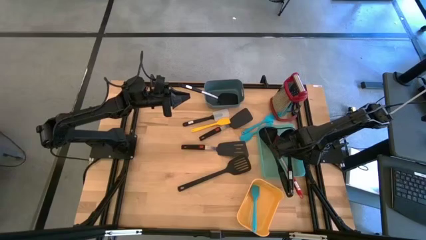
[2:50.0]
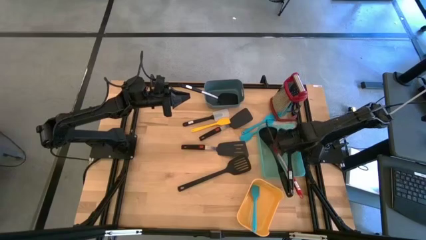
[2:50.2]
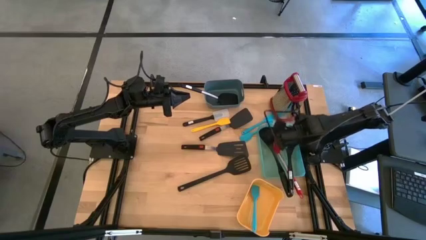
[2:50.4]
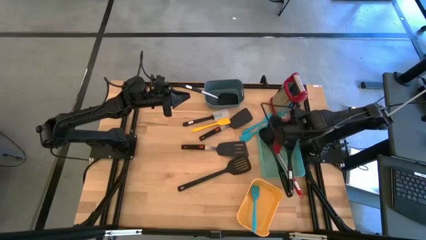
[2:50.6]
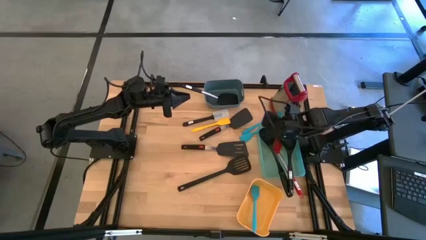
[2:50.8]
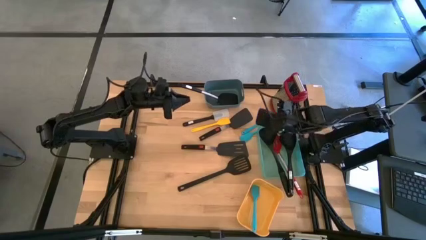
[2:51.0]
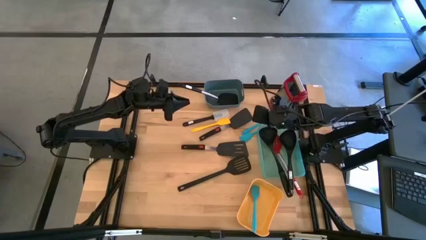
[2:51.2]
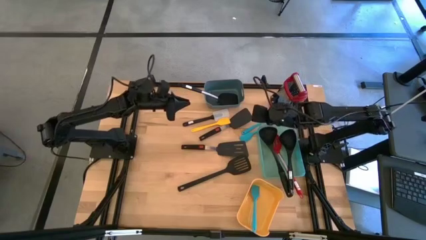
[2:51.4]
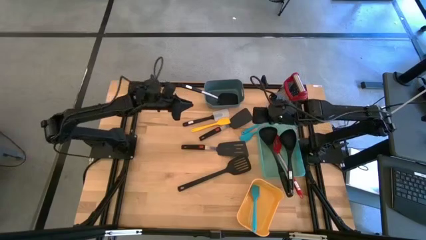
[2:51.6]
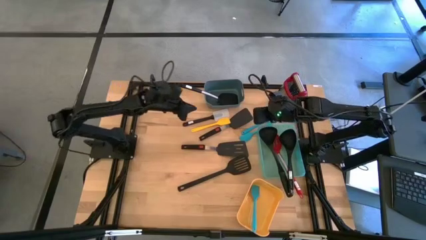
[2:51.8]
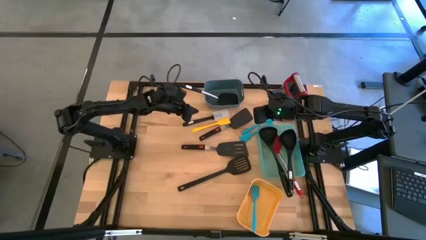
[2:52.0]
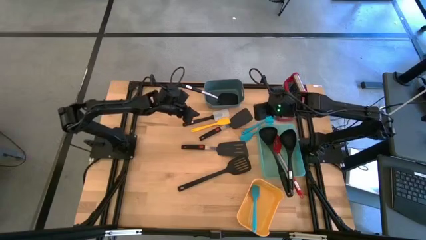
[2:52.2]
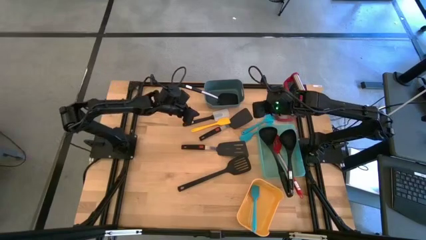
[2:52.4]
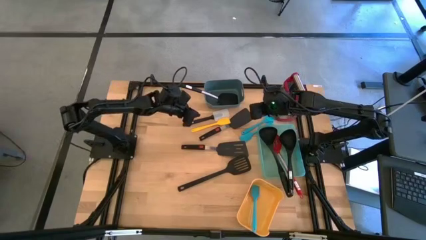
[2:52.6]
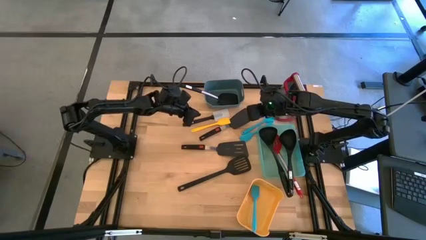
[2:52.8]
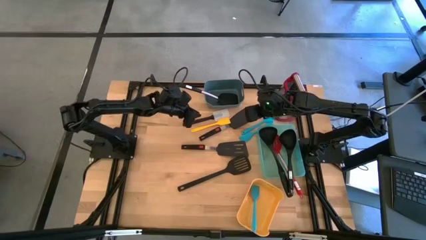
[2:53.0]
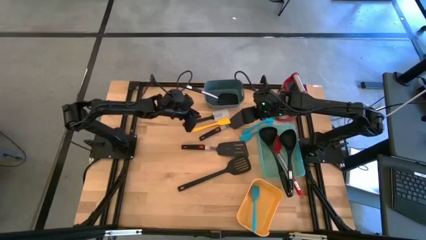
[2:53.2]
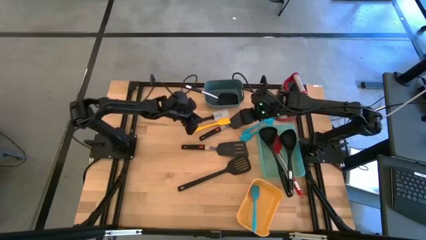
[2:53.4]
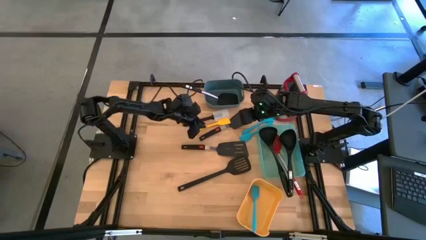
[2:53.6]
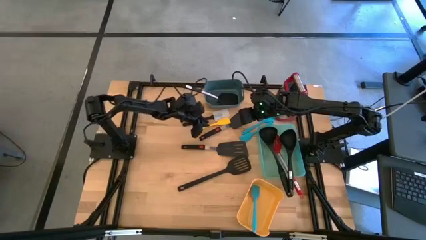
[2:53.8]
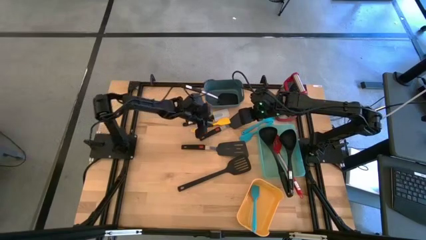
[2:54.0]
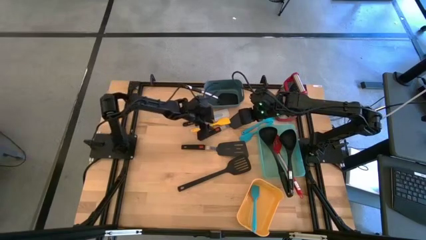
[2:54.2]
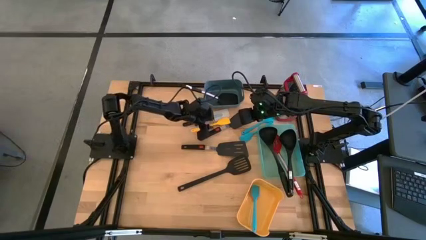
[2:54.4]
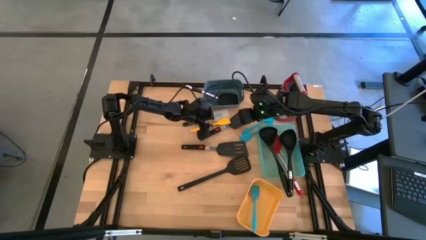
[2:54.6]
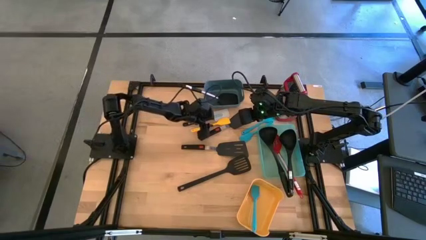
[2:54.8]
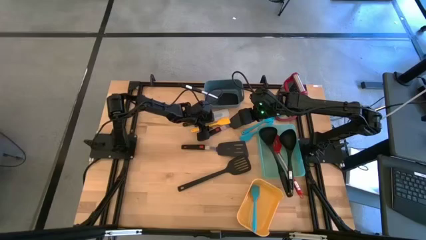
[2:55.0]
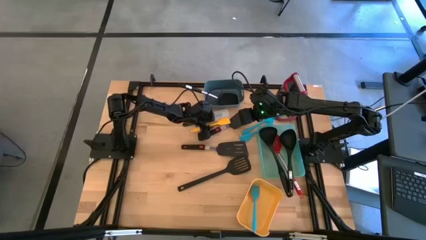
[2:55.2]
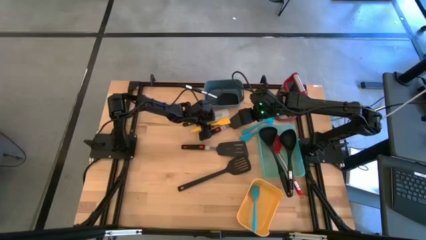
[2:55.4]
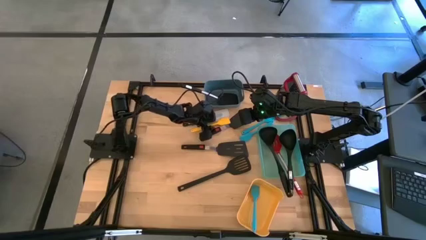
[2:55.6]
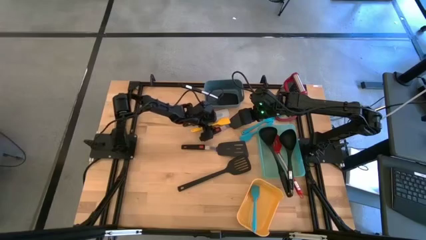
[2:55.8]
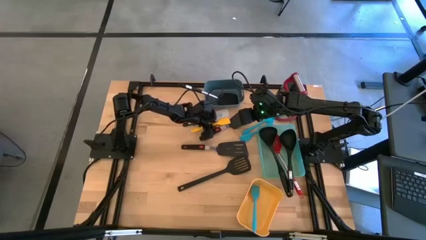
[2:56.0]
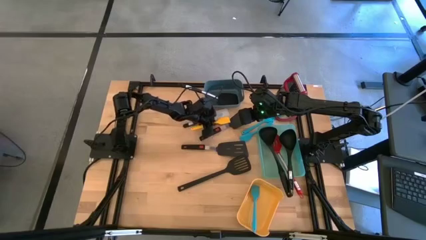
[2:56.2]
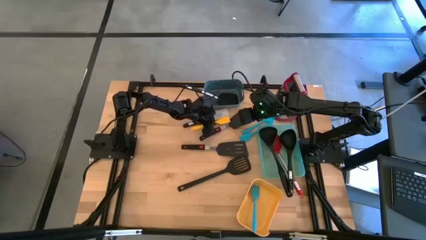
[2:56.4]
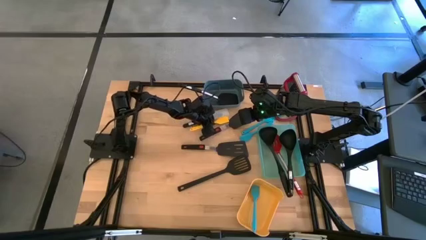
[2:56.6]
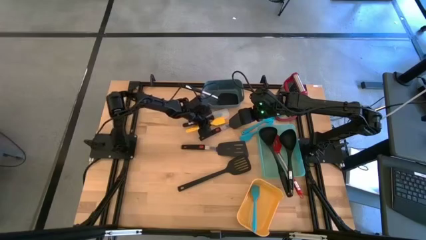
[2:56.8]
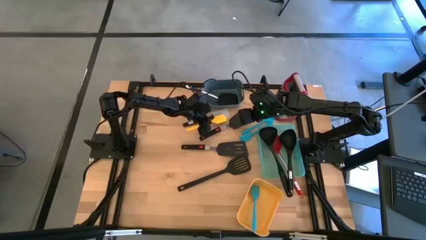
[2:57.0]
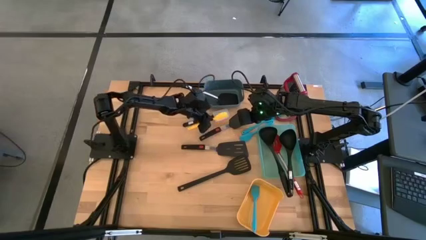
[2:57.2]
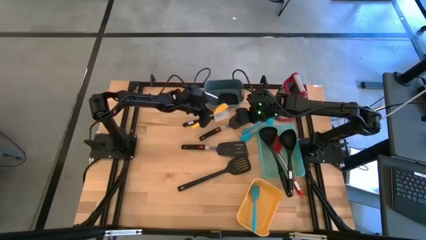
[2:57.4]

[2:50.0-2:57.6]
Task: Pick & Place Kitchen Items
Put the small yellow spatula into the yellow bin

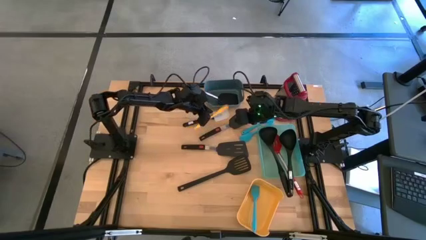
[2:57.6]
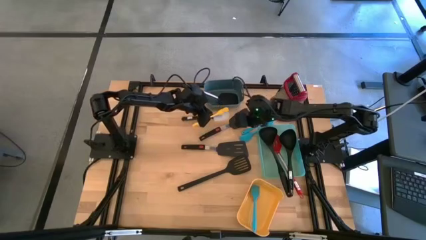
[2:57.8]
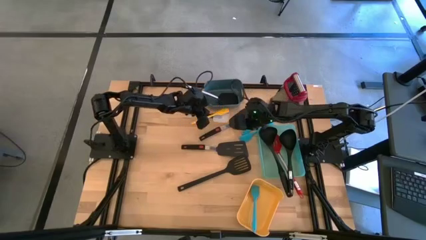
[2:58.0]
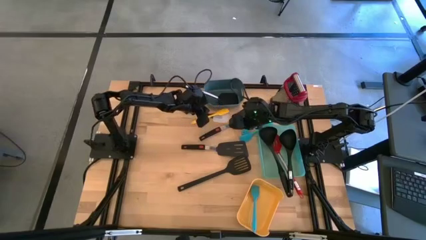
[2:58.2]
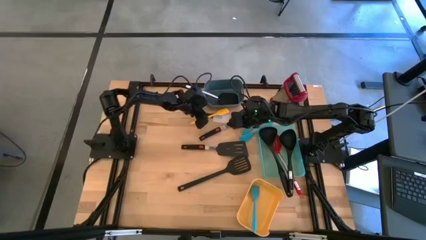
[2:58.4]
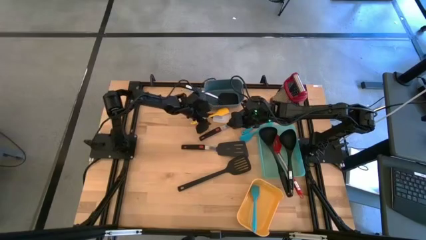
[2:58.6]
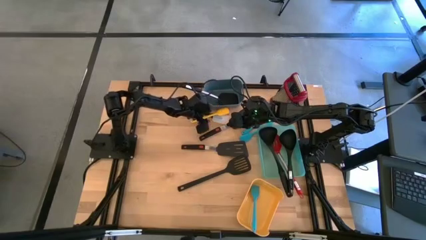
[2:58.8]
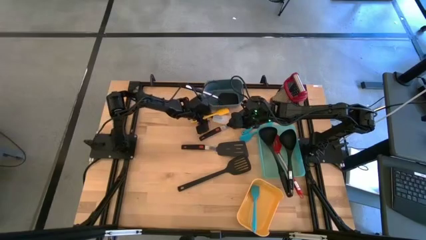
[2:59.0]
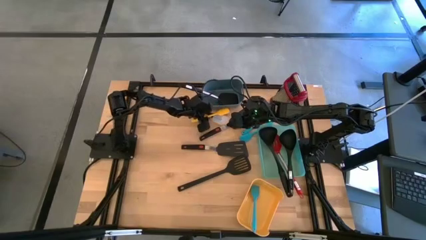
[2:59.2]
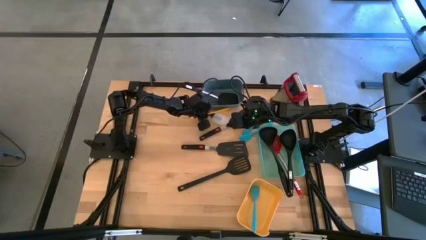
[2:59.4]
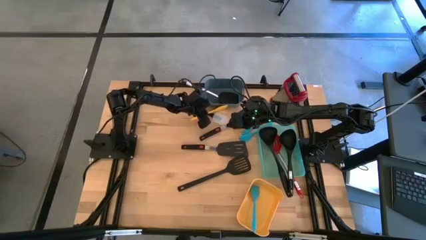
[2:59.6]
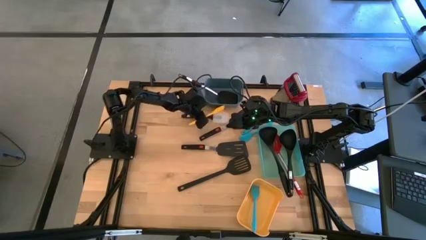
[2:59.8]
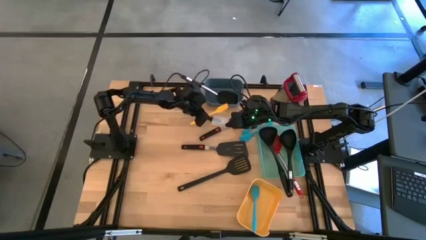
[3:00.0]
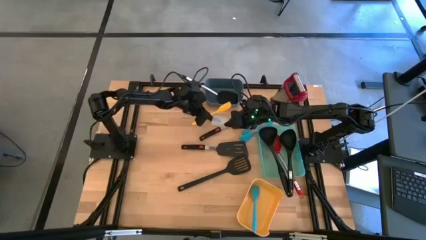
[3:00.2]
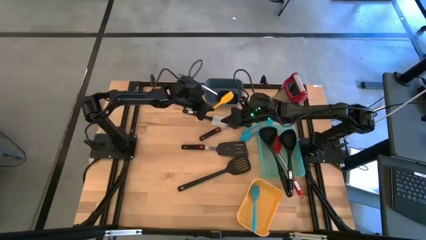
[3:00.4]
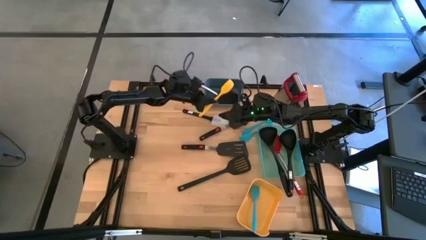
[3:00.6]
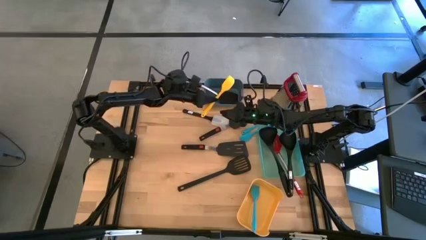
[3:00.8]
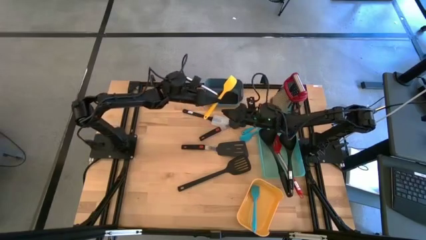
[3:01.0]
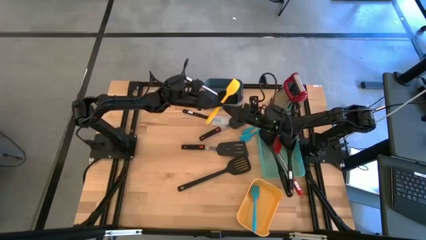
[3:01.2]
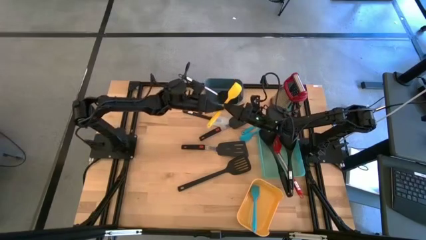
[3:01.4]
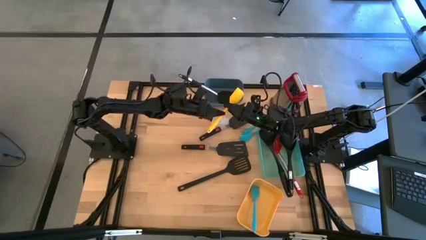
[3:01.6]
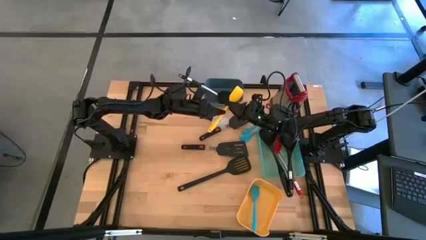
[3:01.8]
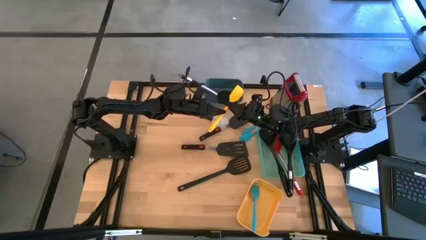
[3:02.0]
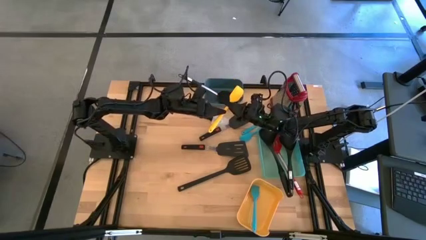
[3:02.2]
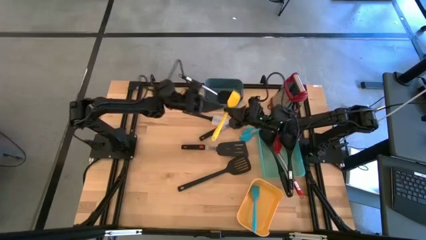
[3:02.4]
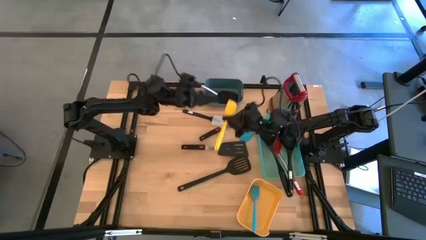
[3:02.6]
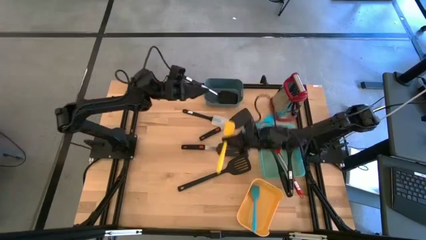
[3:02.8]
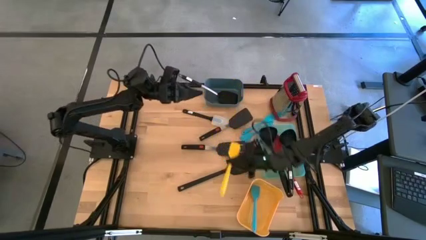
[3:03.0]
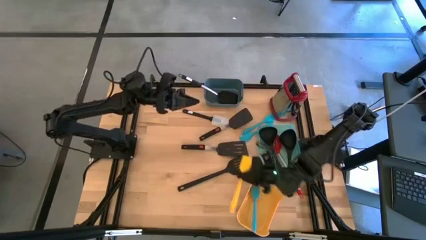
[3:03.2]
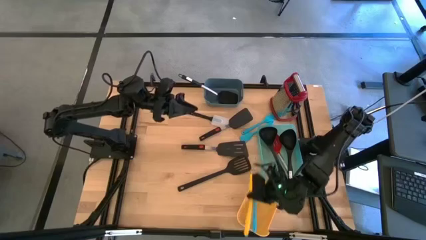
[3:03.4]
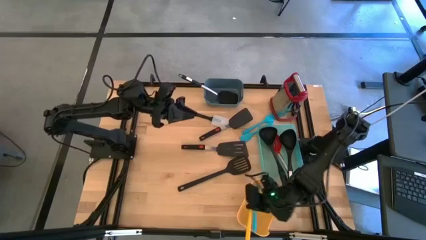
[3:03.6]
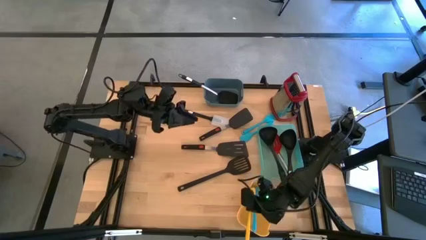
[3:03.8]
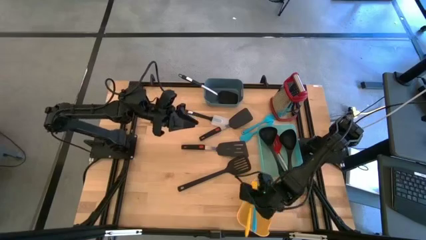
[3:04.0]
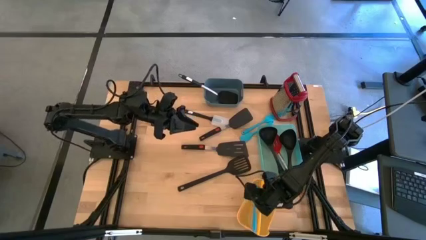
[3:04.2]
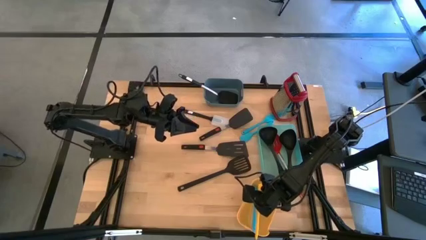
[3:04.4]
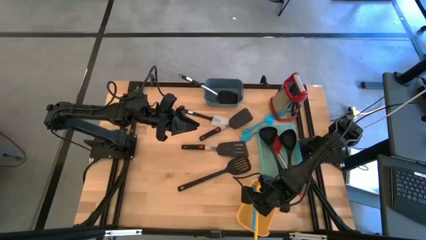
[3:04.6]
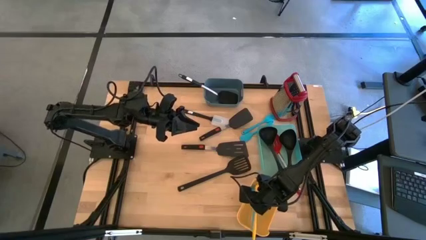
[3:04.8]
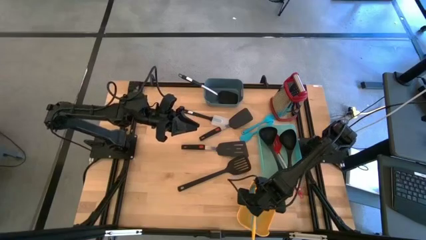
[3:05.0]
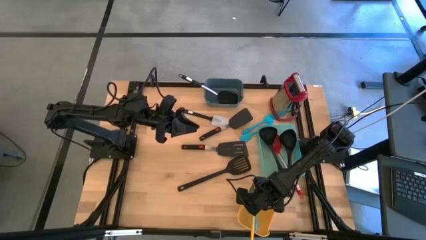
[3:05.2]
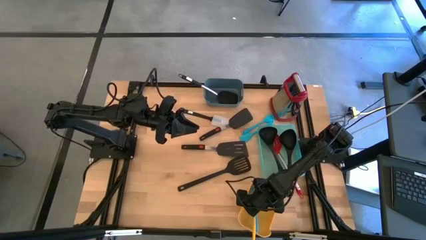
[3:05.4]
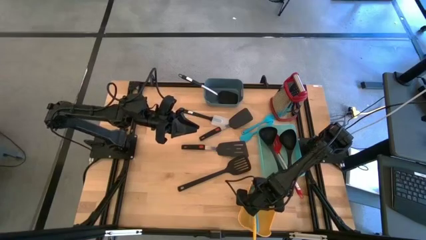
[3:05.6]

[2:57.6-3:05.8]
Put the small yellow spatula into the yellow bin
